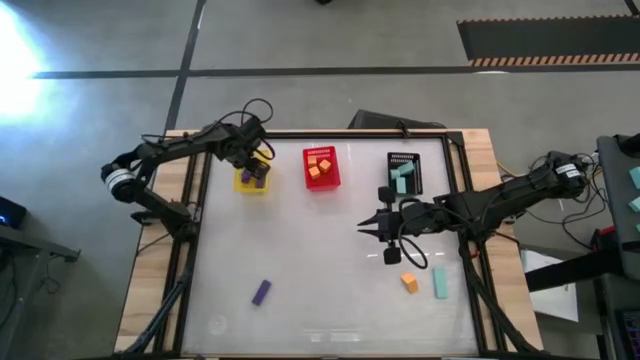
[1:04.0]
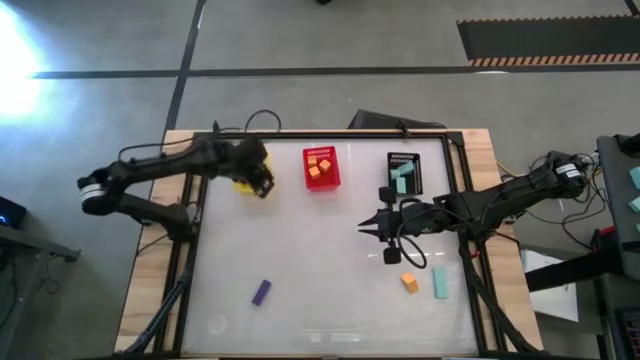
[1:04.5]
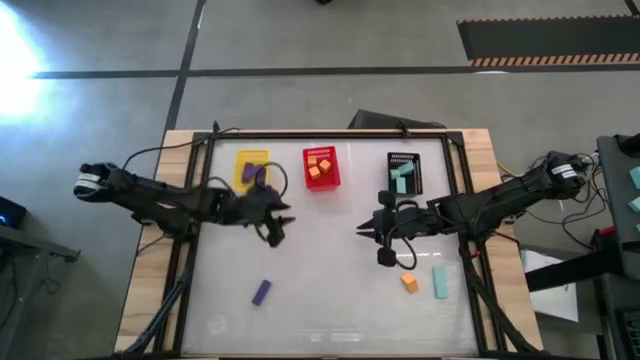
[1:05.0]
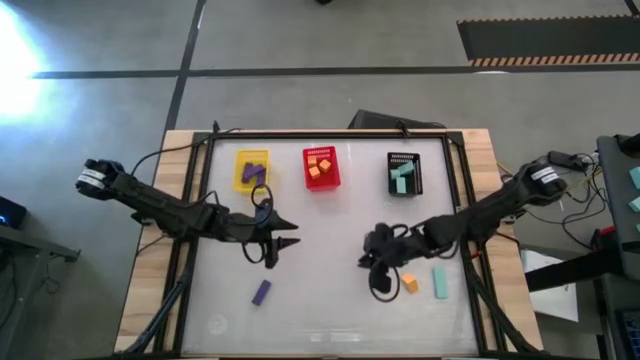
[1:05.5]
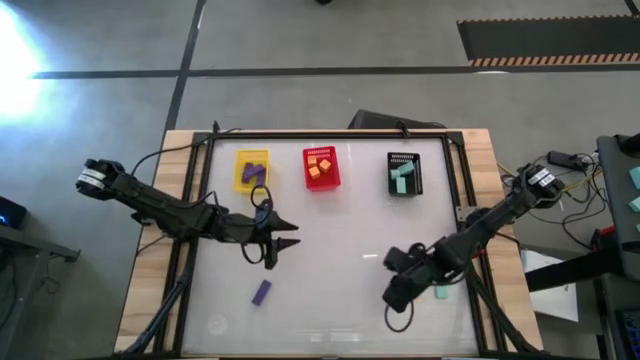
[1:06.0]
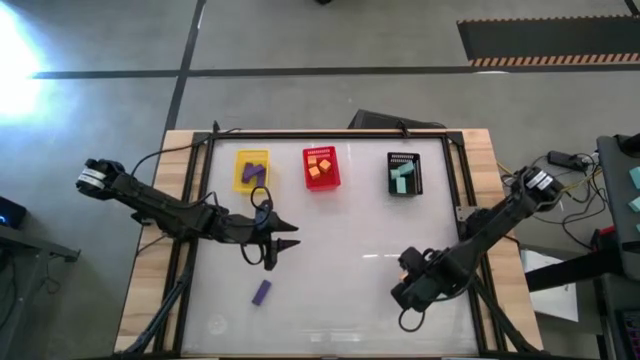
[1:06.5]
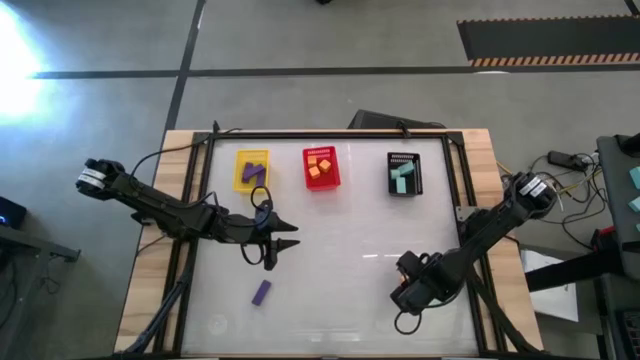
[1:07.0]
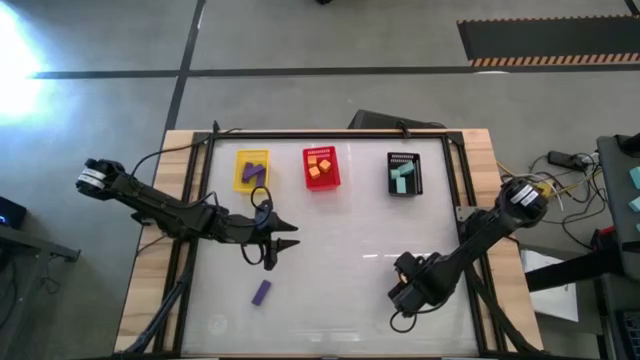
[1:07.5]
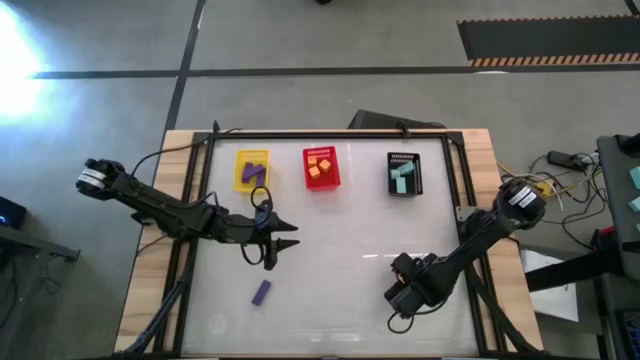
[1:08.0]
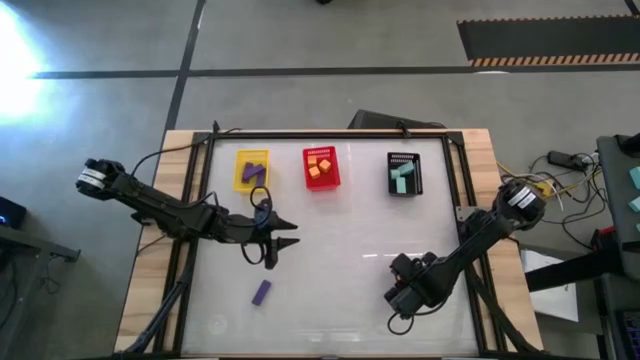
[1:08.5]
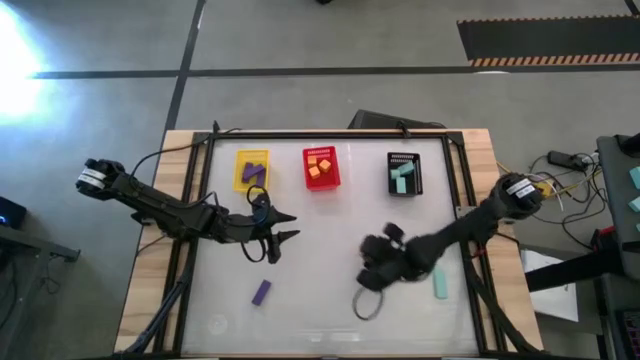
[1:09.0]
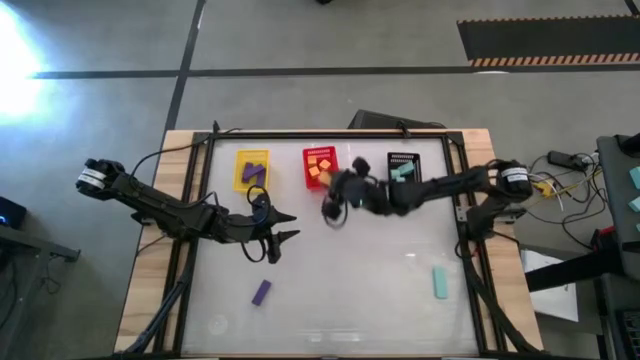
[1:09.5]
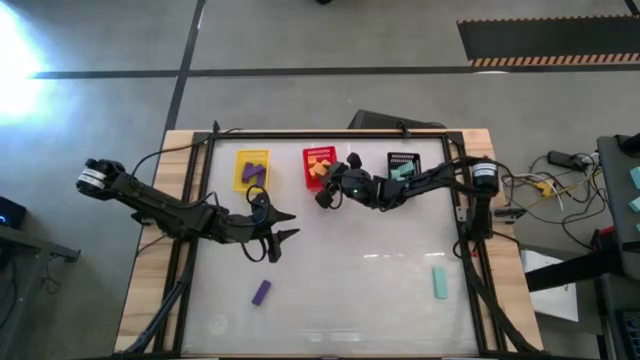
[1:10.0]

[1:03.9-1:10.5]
Task: Sort & place blocks by color
Put the yellow block into the red bin

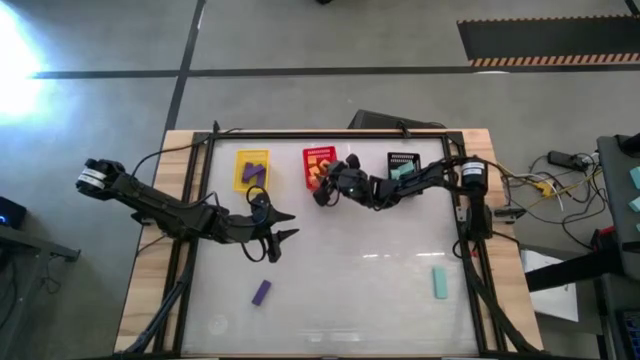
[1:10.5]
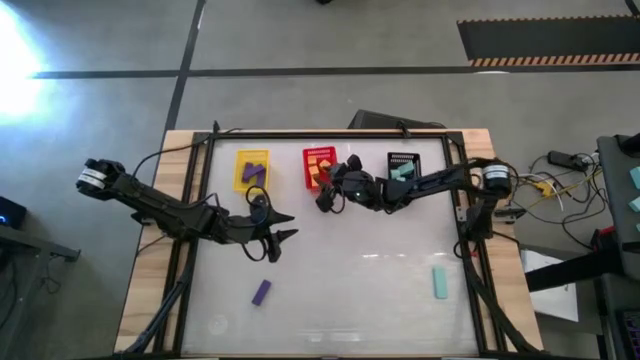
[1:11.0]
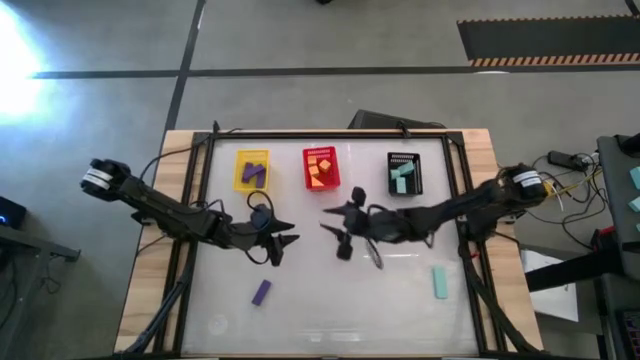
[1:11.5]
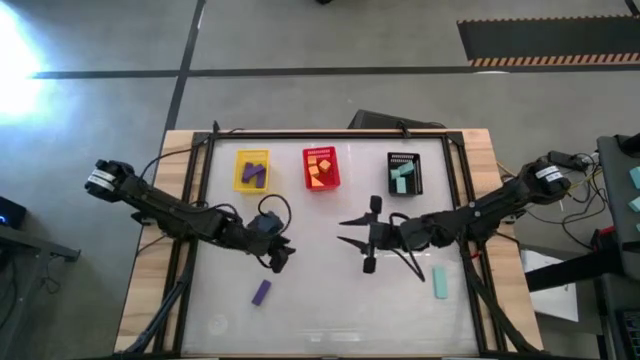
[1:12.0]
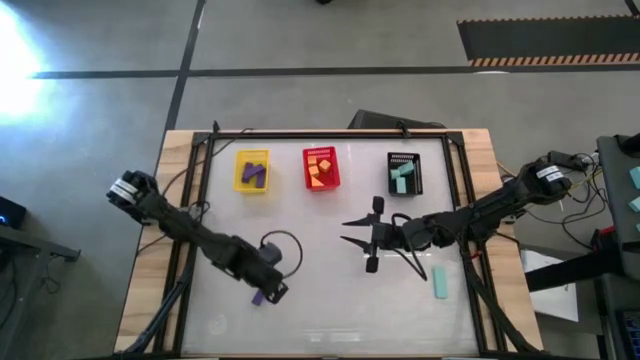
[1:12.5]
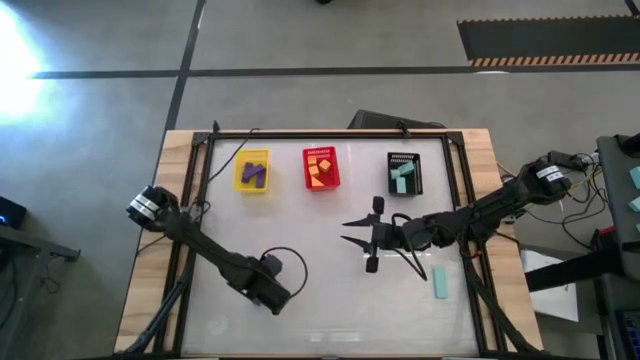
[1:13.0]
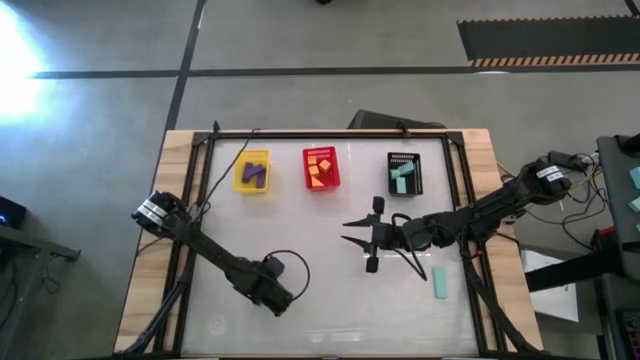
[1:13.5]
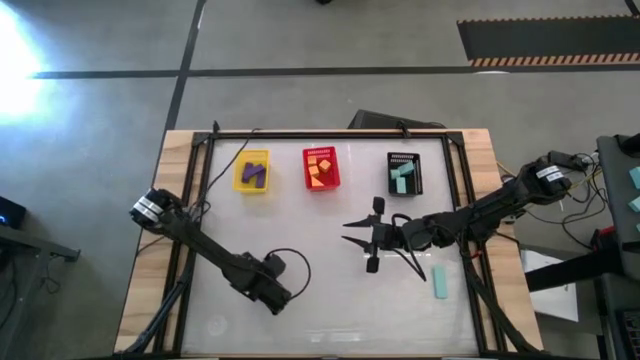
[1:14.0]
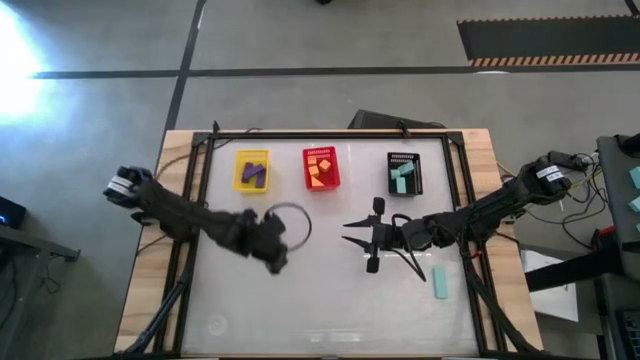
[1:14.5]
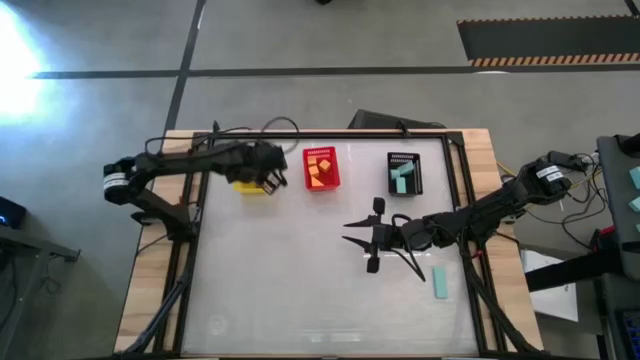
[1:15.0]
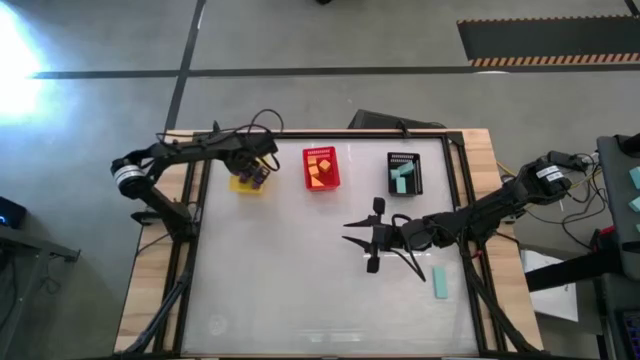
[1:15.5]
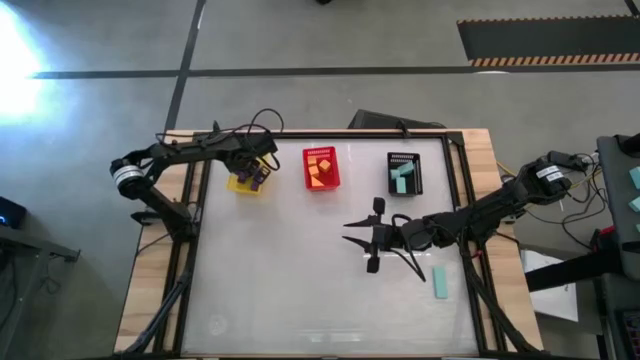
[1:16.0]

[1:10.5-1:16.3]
Put the purple block into the yellow bin

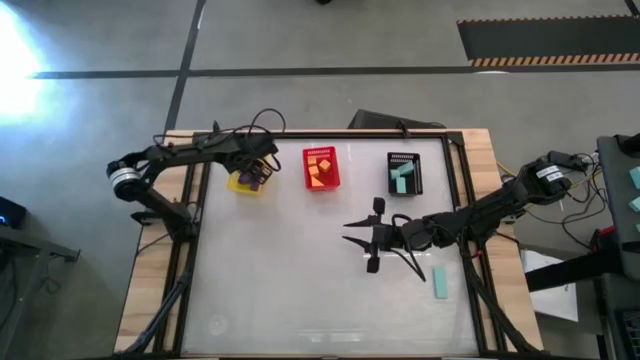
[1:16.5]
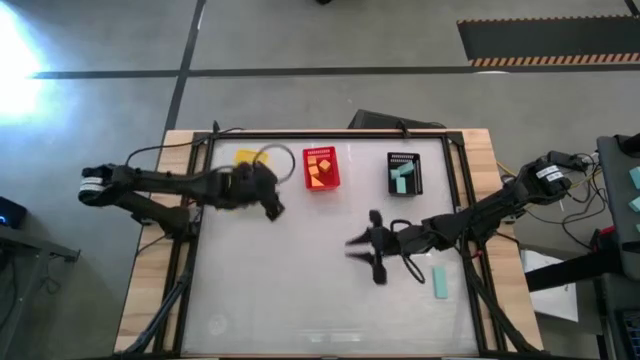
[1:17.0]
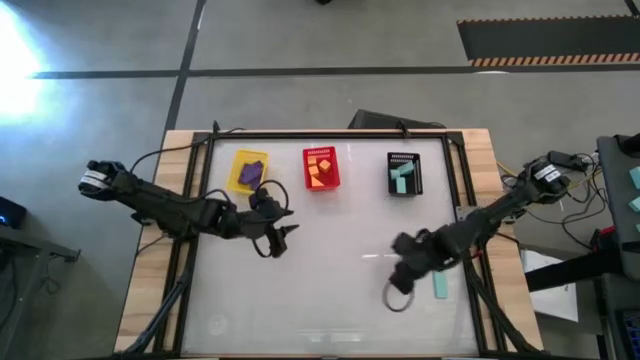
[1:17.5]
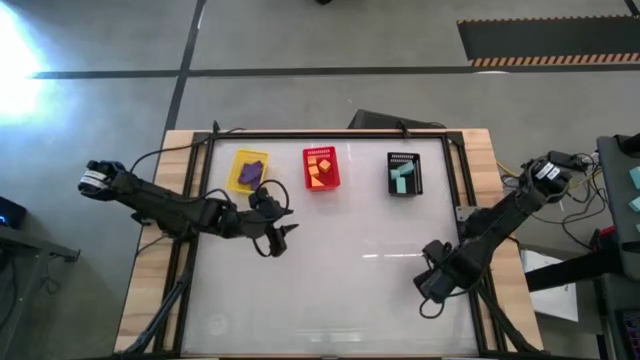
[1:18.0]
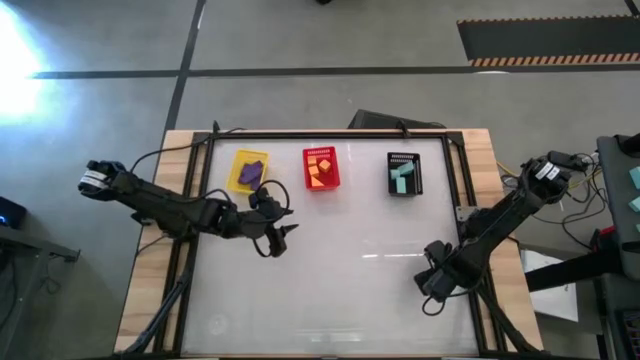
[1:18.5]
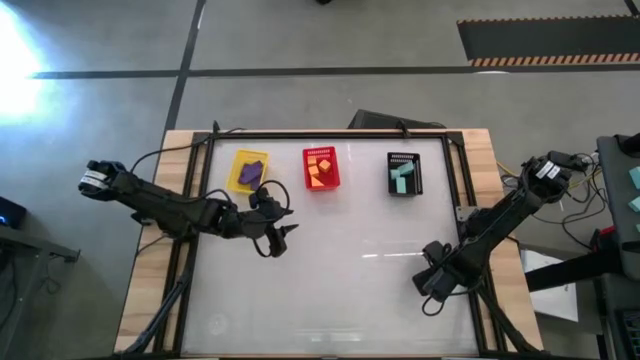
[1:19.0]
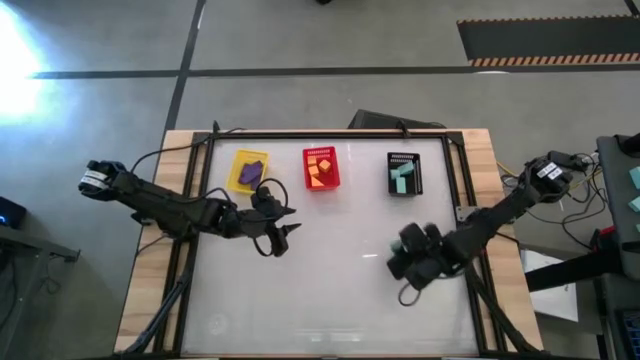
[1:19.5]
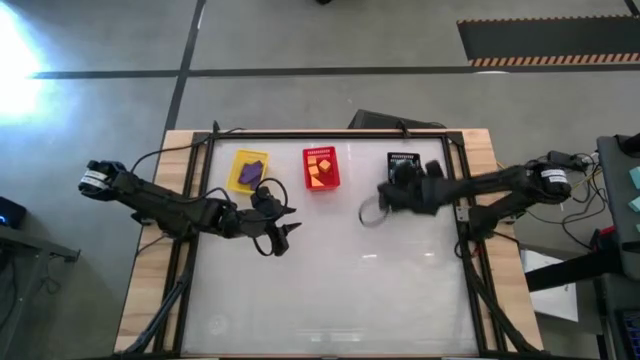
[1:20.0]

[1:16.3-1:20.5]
Put the blue block into the black bin
